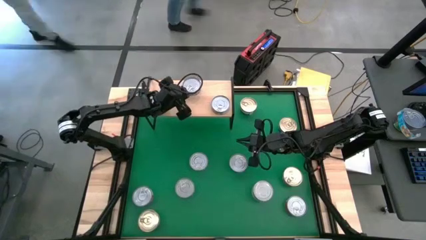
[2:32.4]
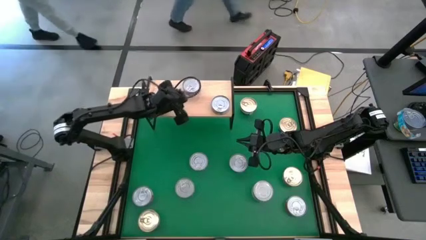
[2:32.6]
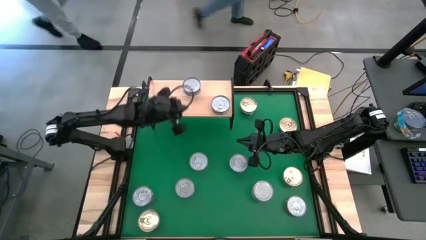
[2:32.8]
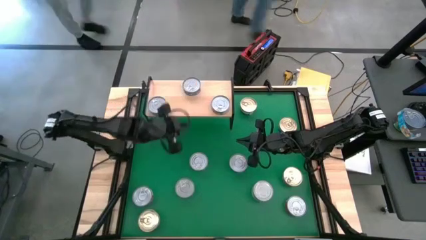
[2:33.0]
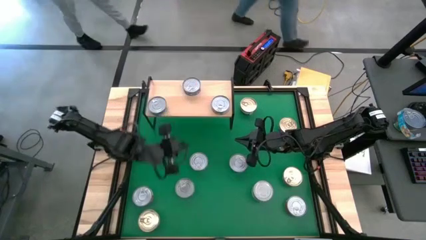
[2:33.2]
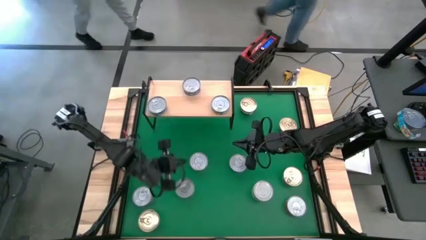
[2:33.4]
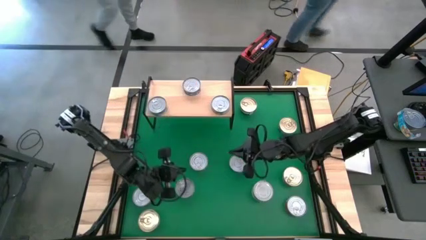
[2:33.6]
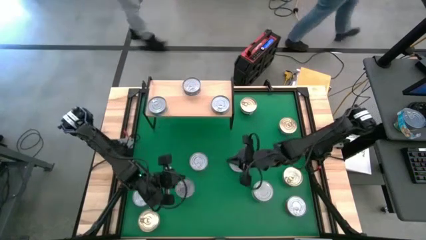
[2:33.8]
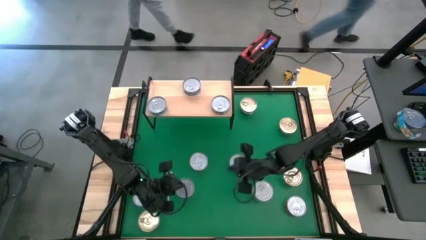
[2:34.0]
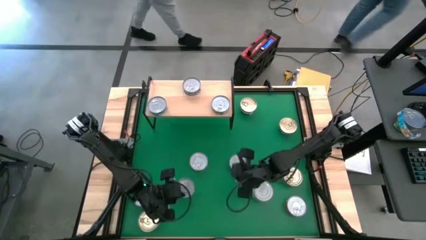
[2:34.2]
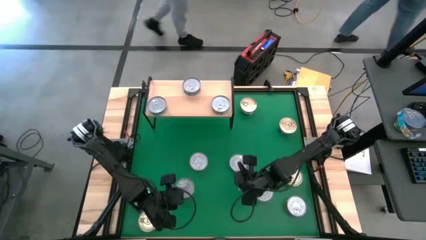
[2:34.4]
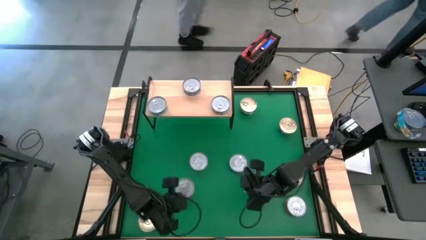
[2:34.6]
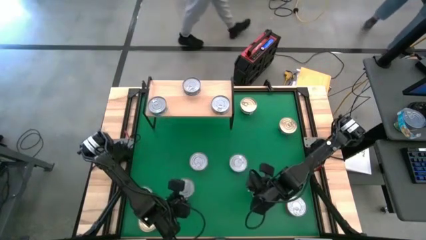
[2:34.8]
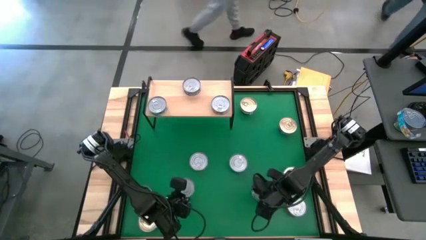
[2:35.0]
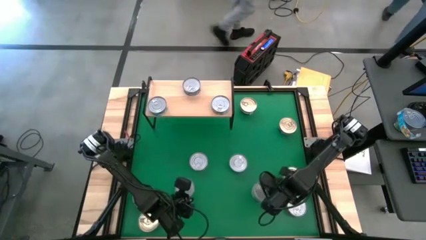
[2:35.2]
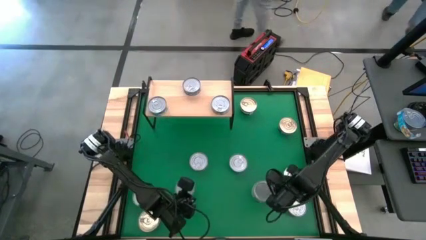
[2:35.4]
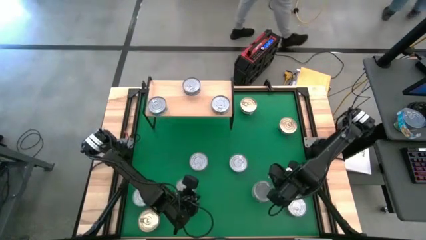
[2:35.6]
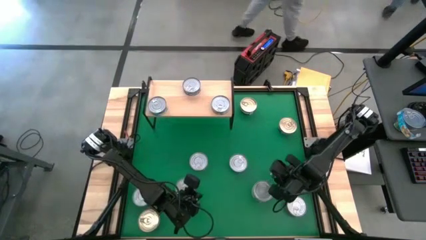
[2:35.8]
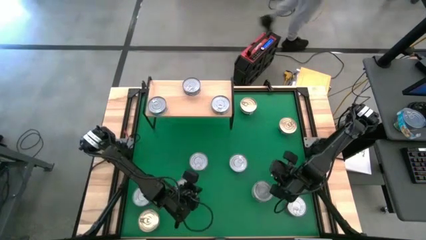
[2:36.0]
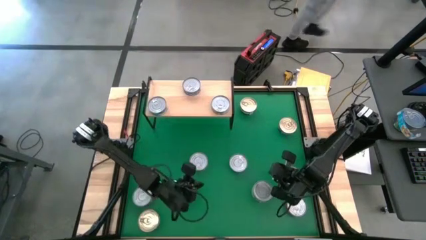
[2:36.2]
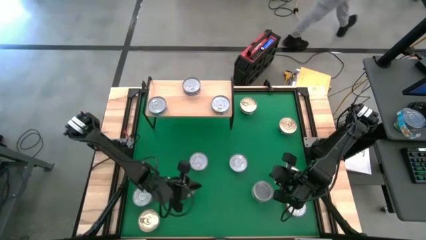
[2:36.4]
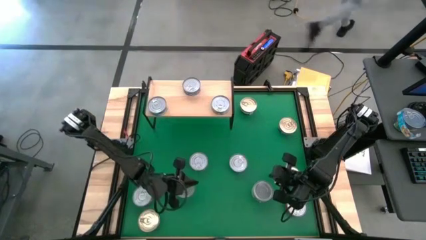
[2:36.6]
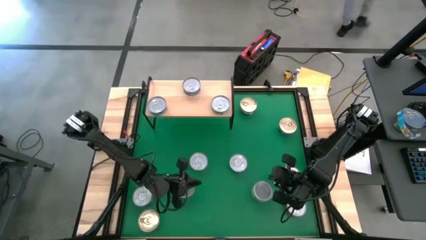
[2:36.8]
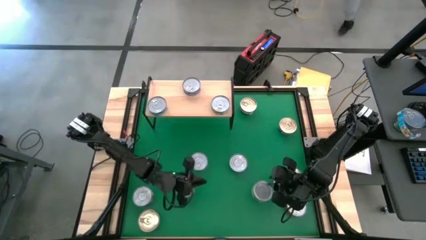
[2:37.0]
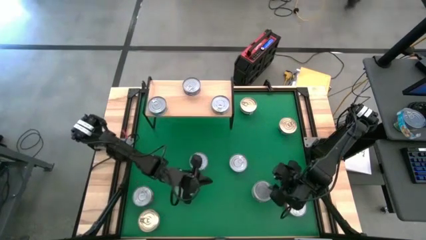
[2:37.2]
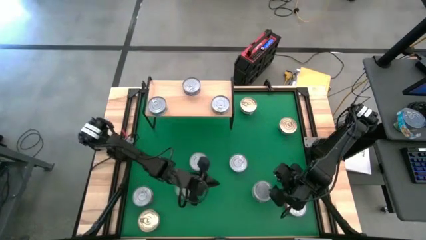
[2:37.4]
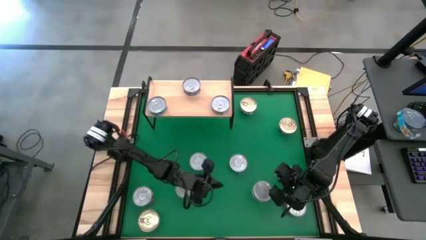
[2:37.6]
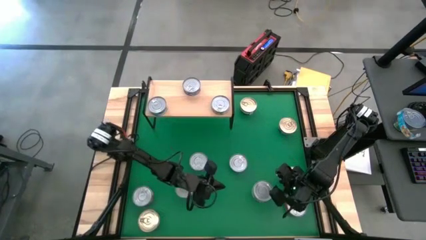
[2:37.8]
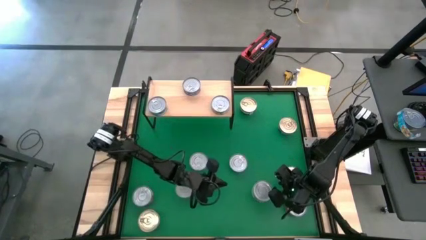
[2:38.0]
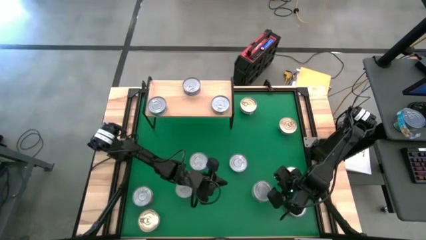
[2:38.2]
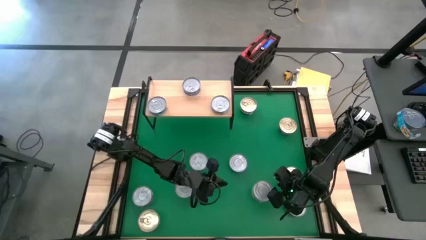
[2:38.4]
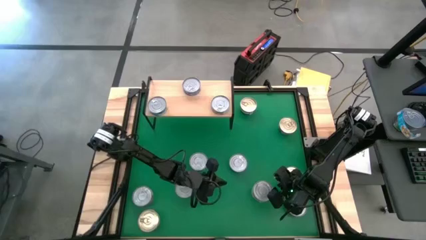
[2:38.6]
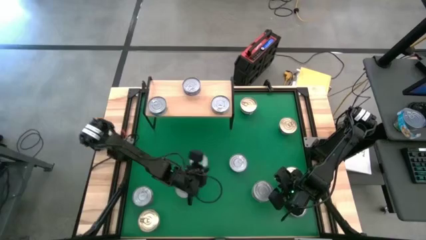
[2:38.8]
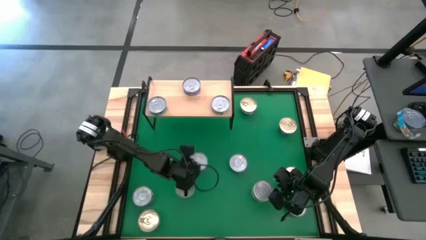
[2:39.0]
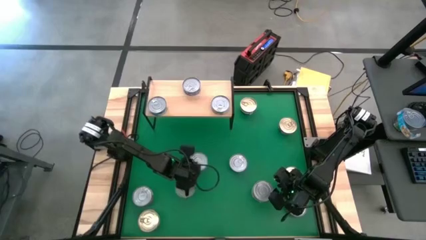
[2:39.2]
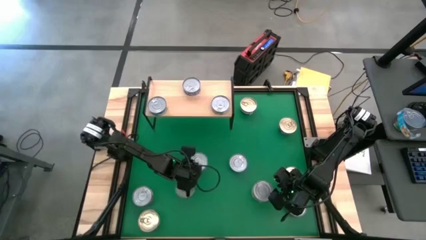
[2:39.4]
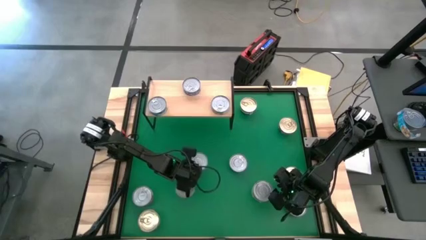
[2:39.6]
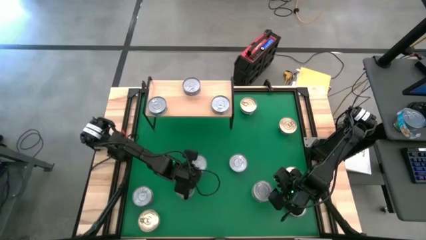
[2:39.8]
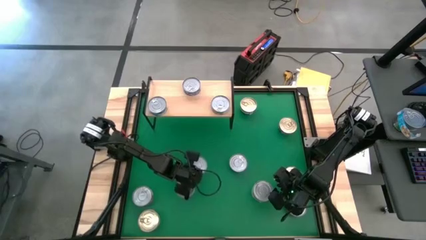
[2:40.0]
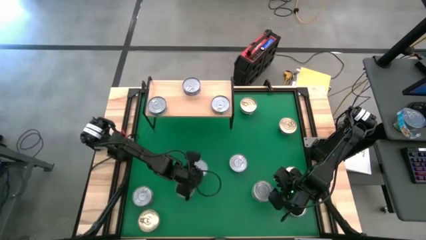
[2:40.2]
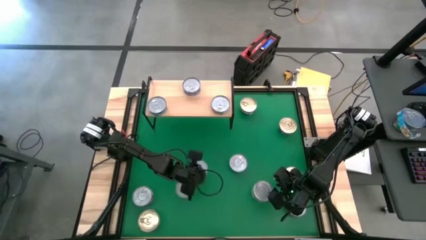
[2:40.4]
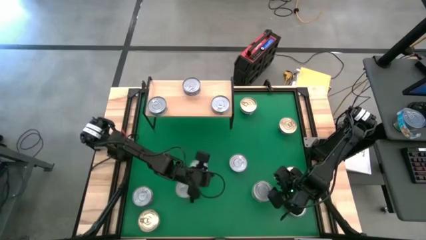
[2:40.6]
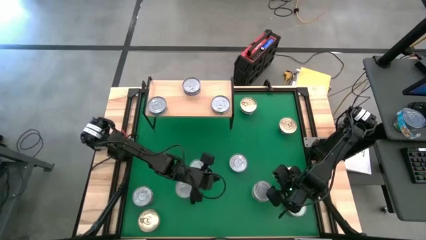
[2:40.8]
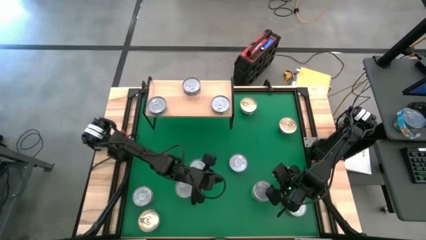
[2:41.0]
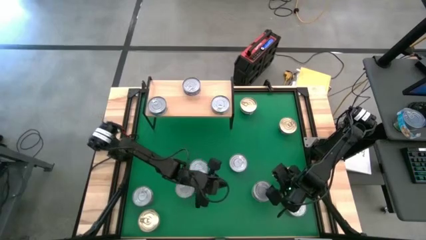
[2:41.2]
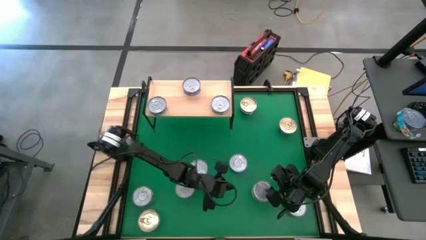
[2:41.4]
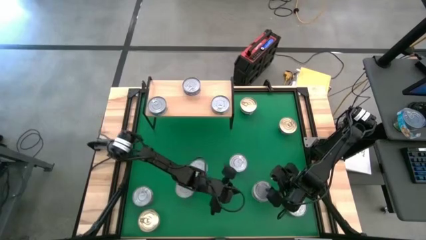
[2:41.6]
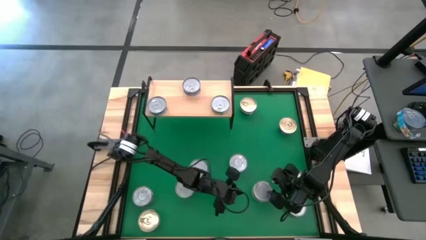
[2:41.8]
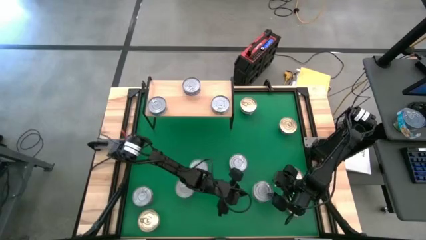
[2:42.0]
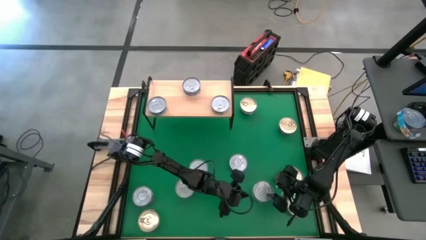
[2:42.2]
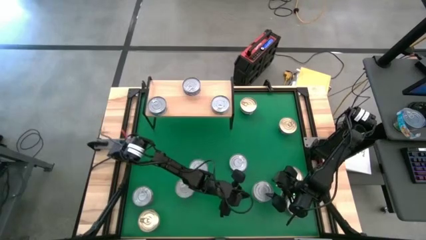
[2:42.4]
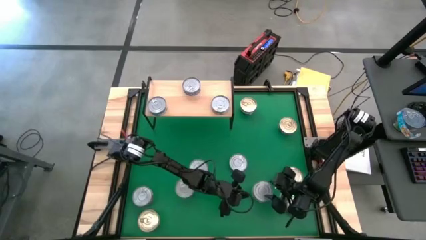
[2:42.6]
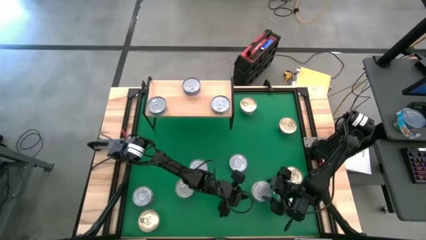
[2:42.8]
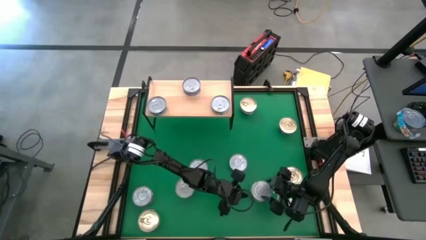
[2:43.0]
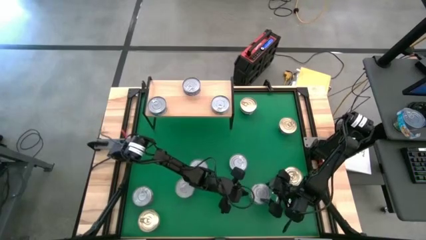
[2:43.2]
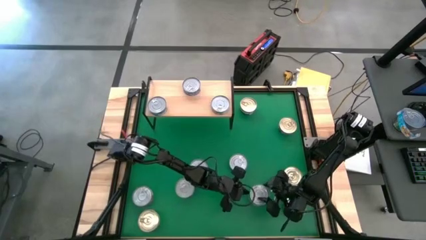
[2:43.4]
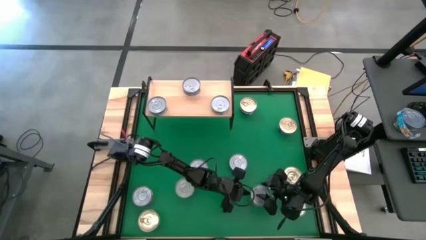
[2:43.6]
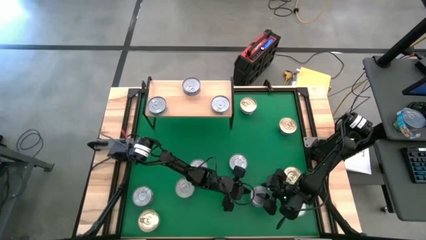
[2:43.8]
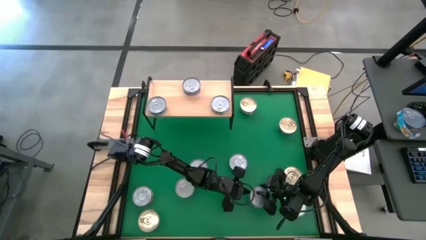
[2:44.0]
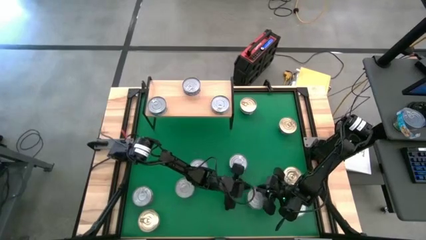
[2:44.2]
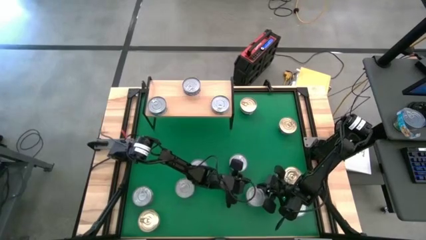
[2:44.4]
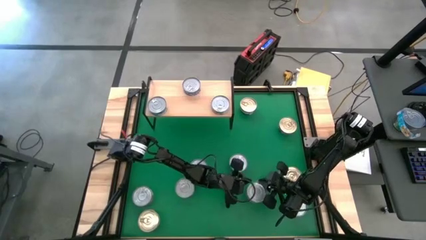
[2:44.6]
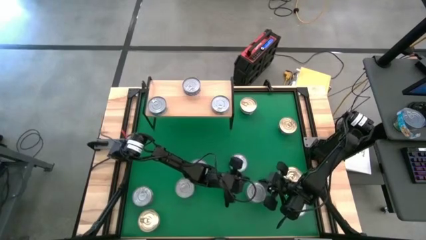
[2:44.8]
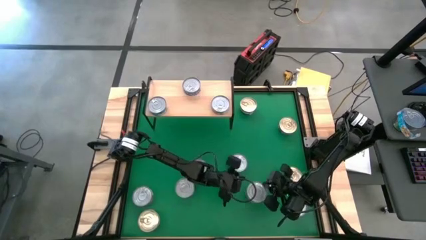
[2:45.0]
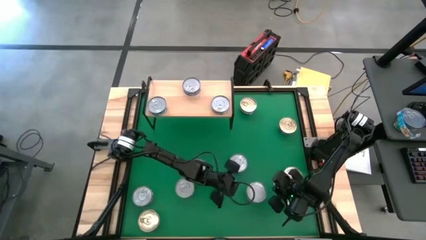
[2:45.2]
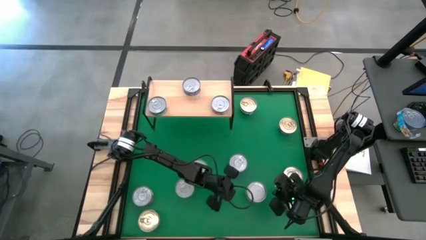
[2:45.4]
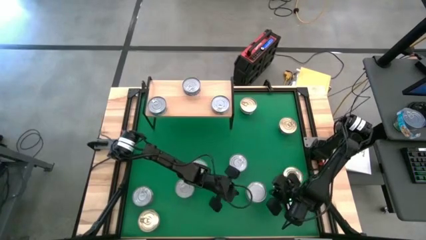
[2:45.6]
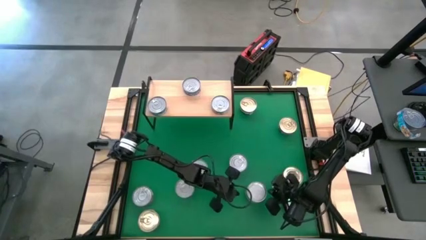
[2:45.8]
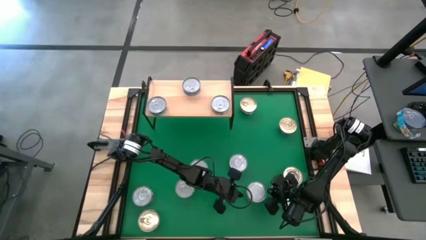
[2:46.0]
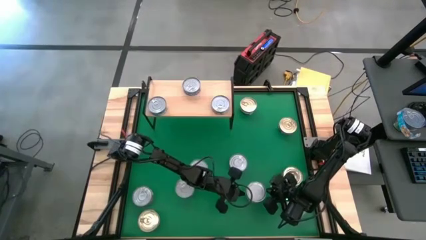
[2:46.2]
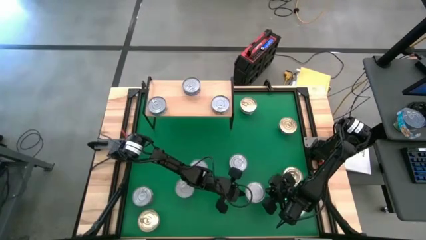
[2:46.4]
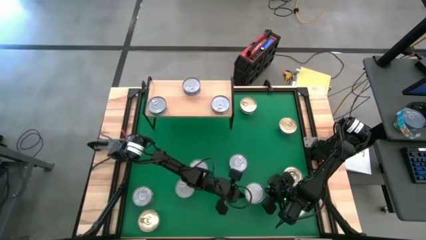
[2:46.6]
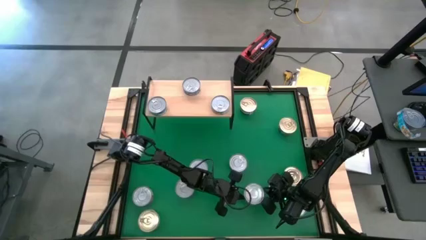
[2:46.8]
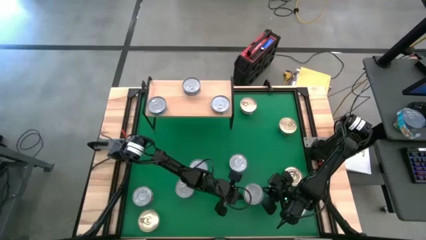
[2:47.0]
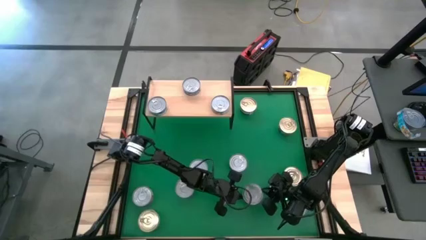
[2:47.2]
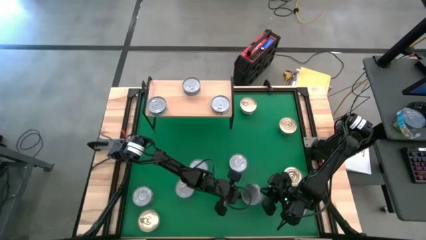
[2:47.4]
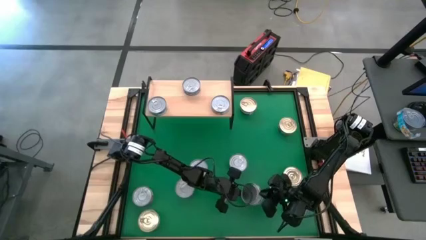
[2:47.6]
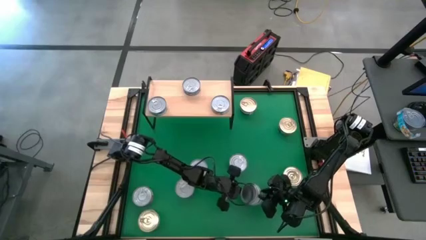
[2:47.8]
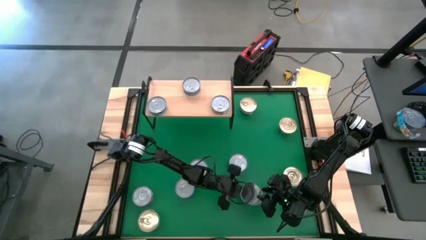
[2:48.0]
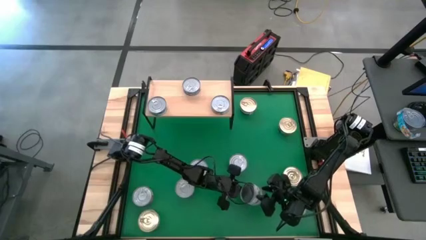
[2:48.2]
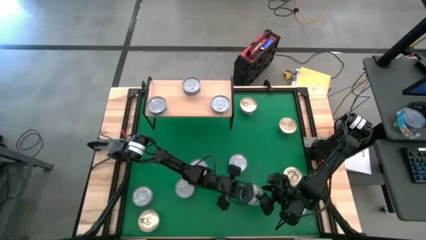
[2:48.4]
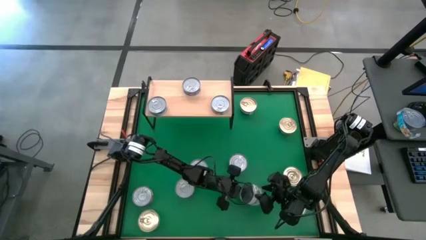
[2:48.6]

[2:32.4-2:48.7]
Task: Stack canned seafood by type on shelf
Put the bottom right white tuna can on the shelf
